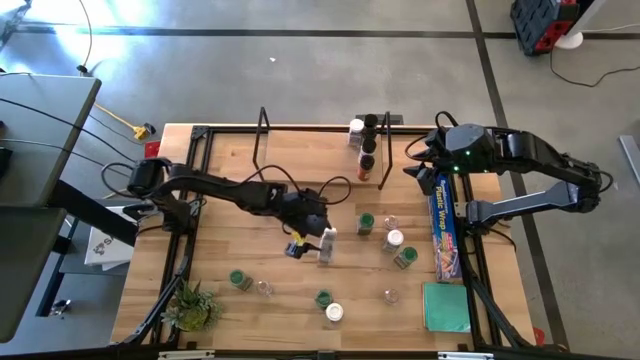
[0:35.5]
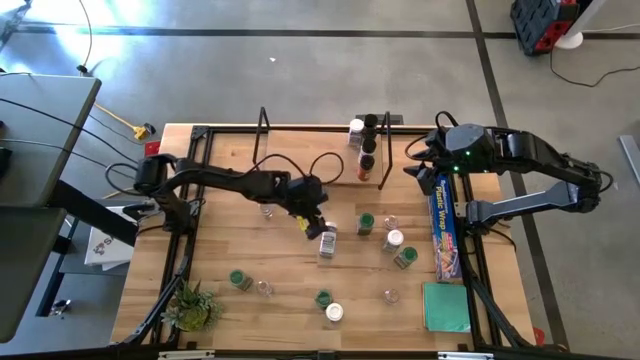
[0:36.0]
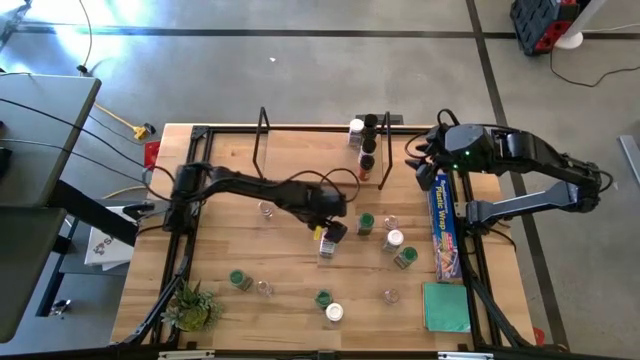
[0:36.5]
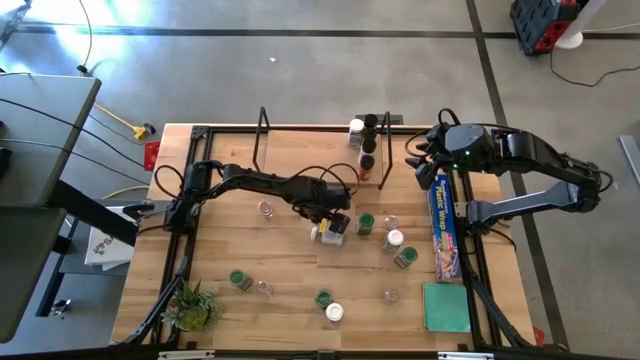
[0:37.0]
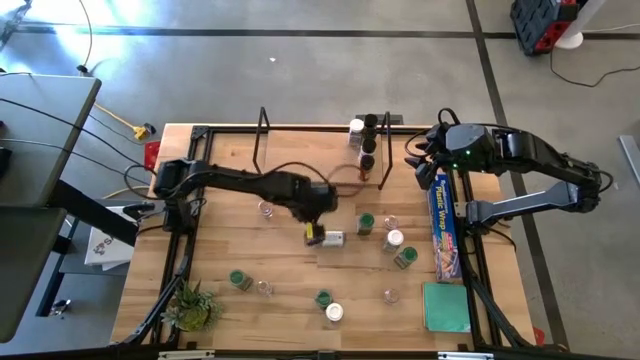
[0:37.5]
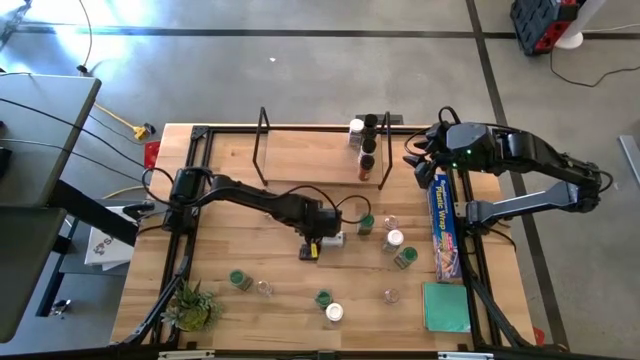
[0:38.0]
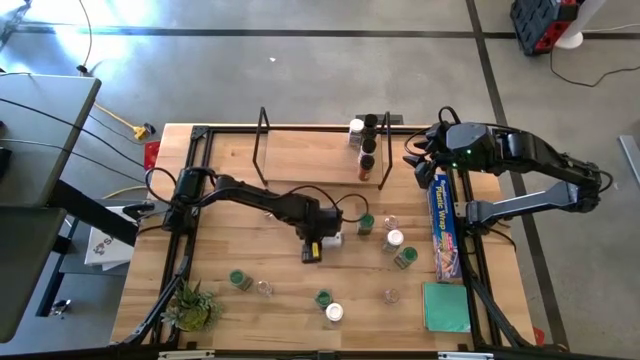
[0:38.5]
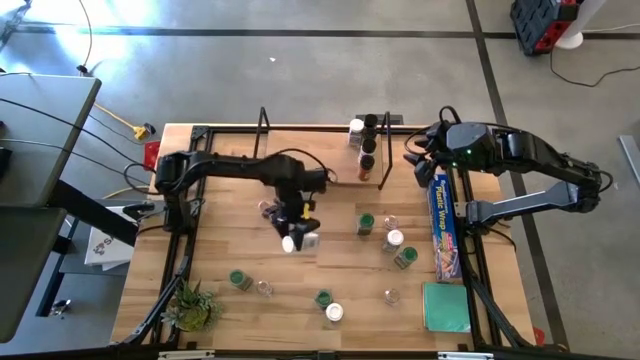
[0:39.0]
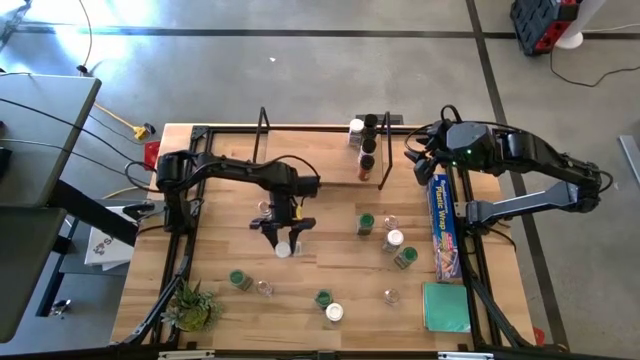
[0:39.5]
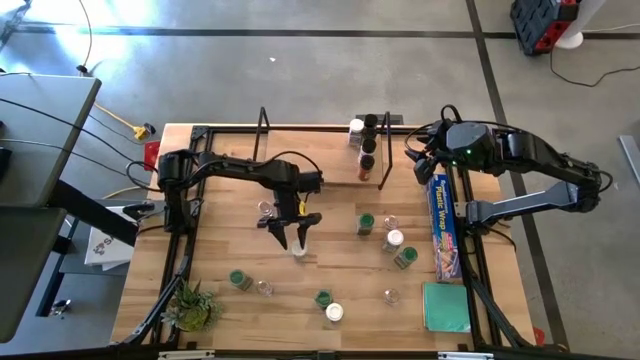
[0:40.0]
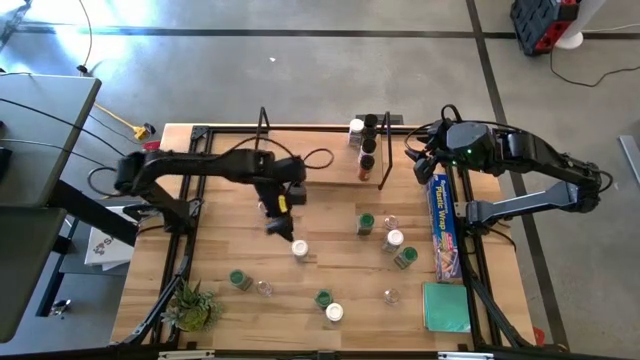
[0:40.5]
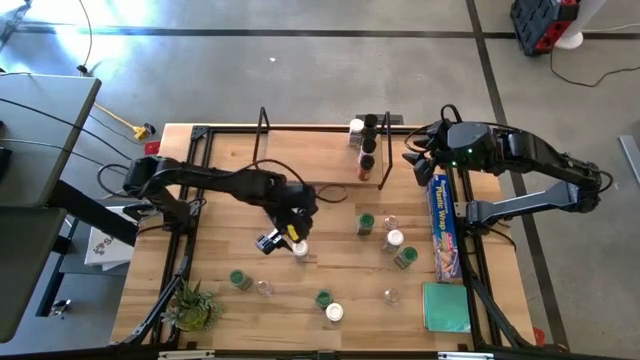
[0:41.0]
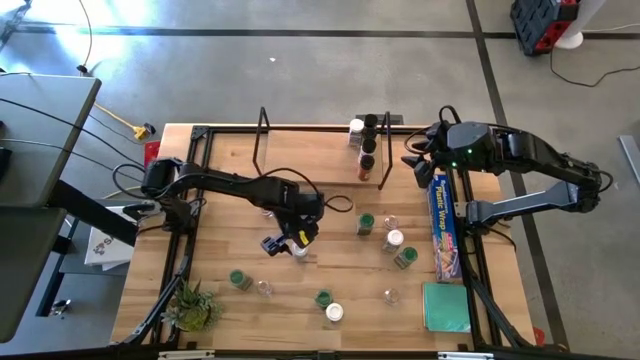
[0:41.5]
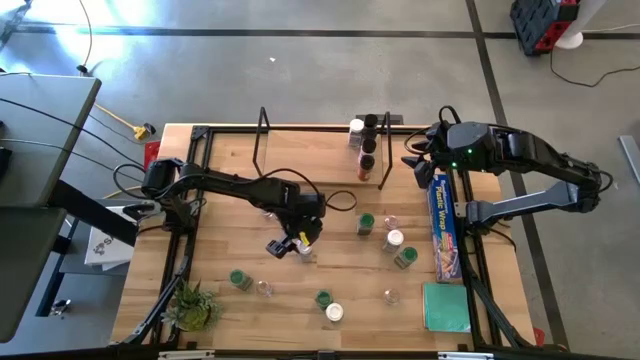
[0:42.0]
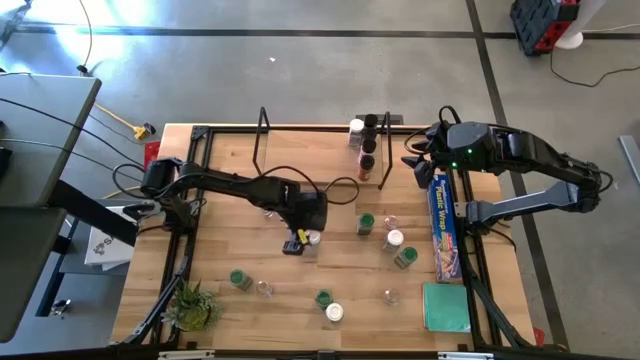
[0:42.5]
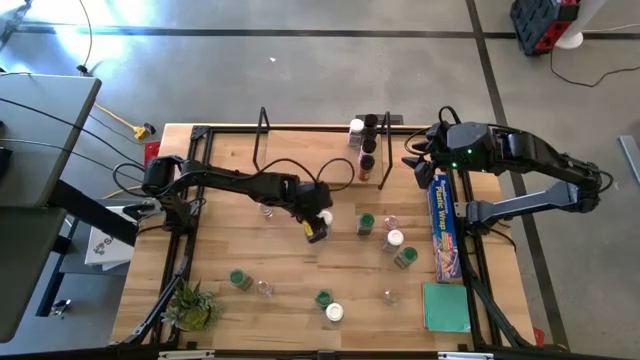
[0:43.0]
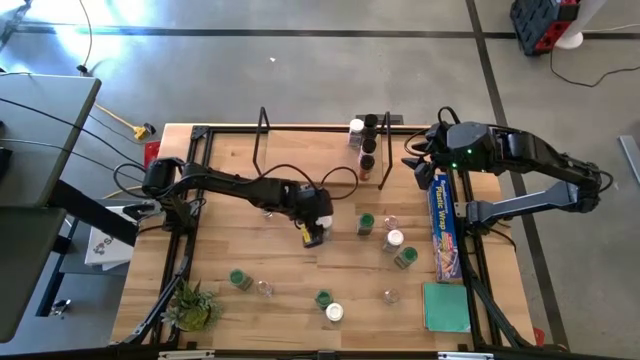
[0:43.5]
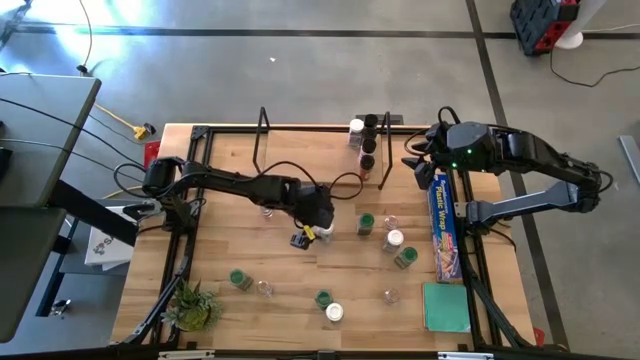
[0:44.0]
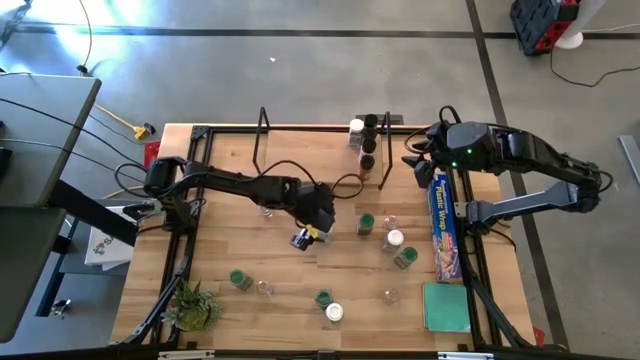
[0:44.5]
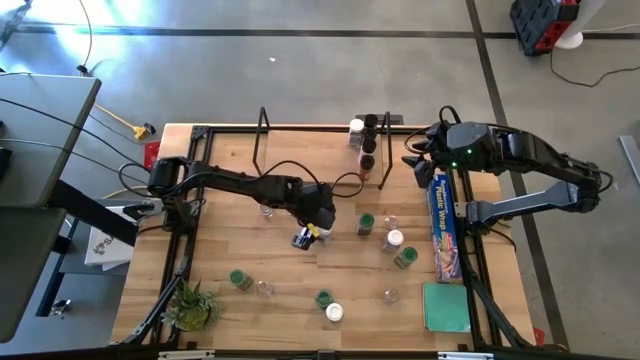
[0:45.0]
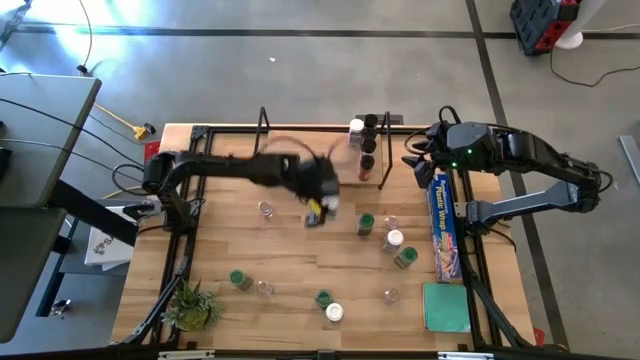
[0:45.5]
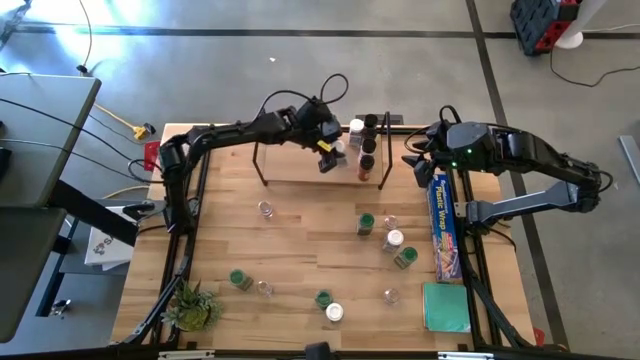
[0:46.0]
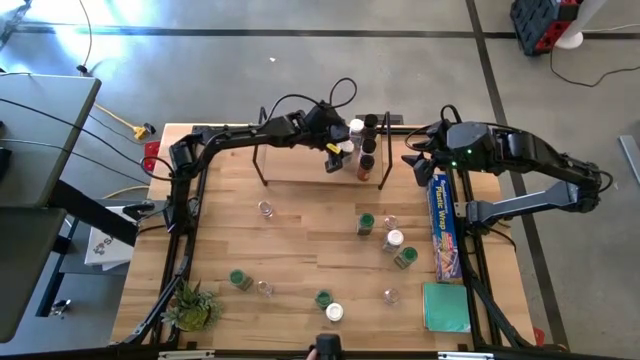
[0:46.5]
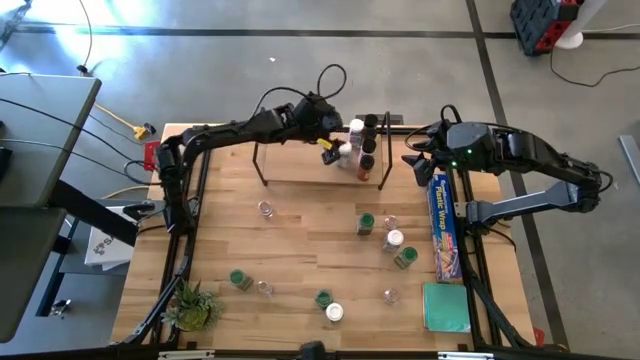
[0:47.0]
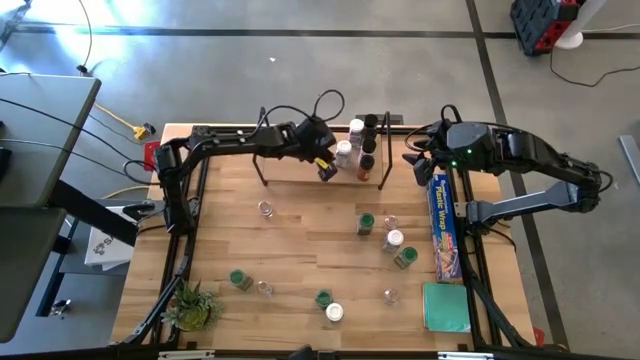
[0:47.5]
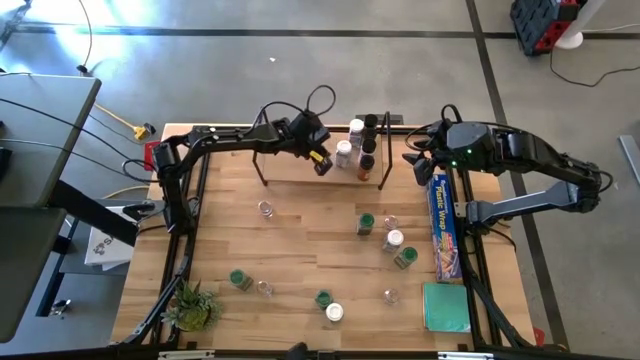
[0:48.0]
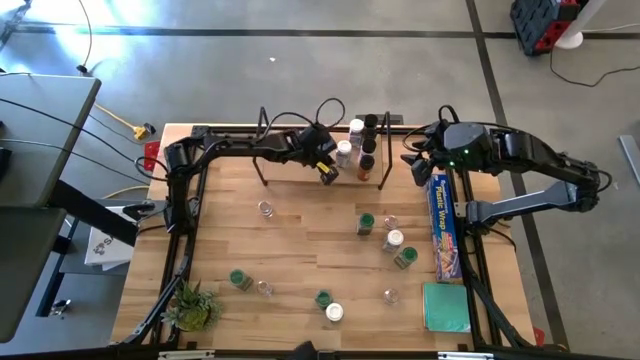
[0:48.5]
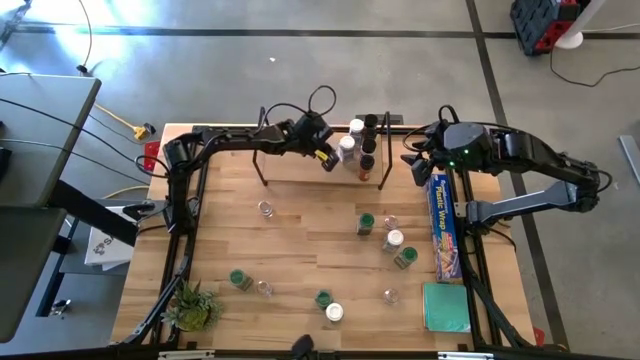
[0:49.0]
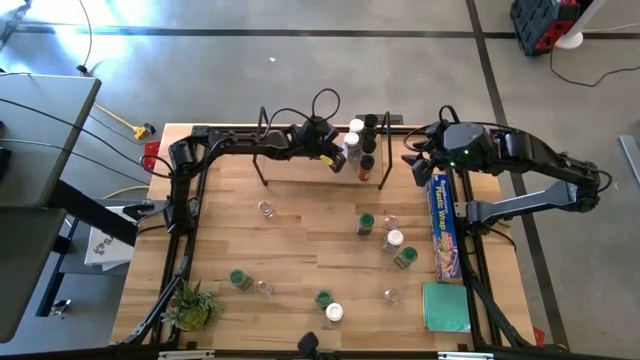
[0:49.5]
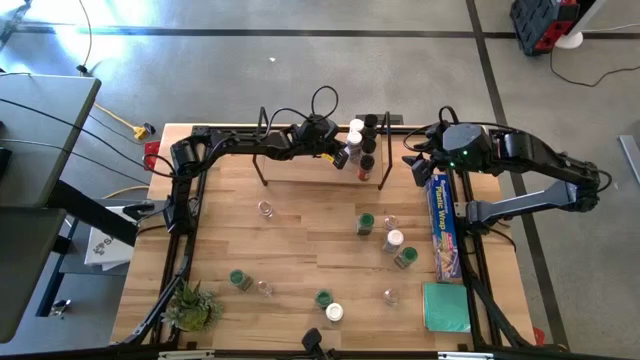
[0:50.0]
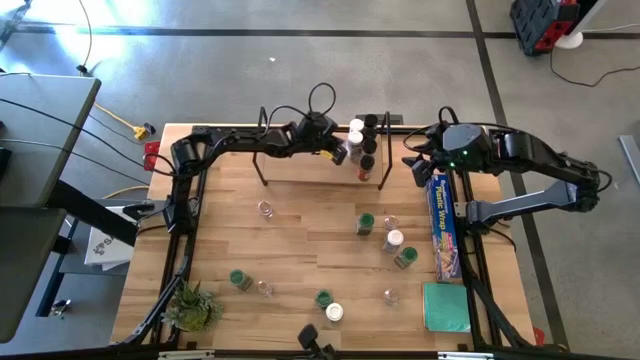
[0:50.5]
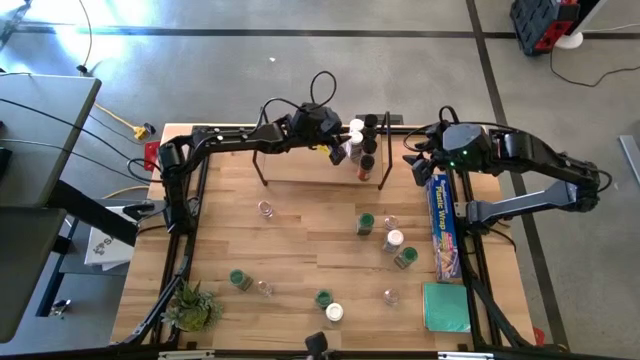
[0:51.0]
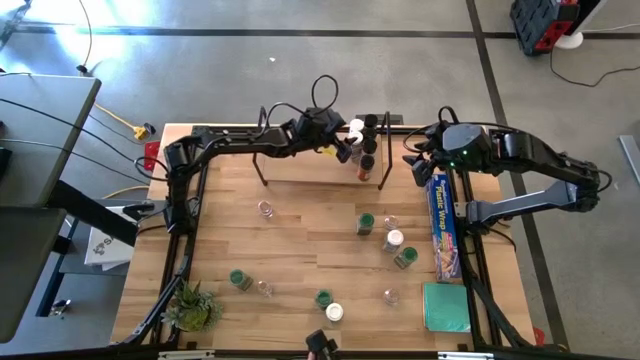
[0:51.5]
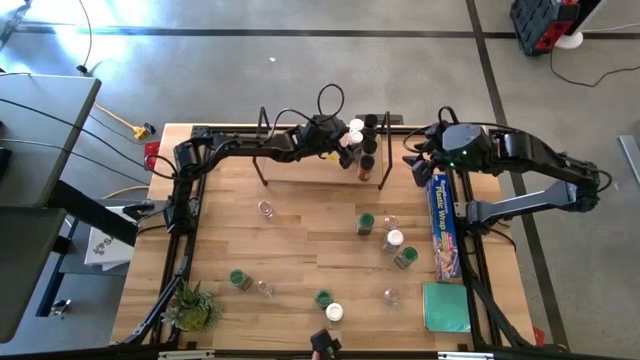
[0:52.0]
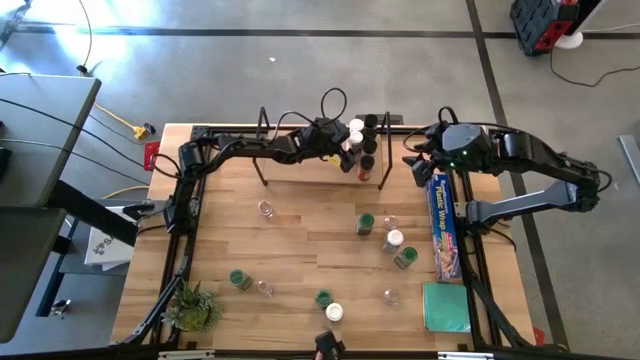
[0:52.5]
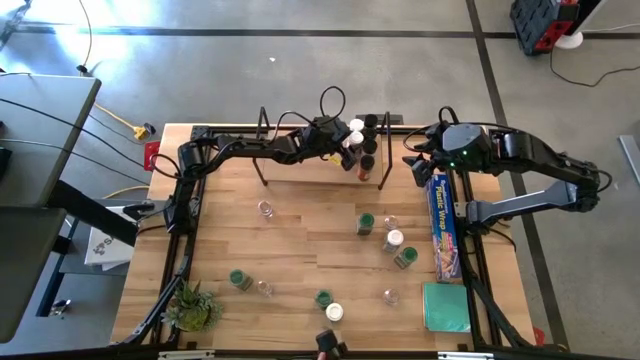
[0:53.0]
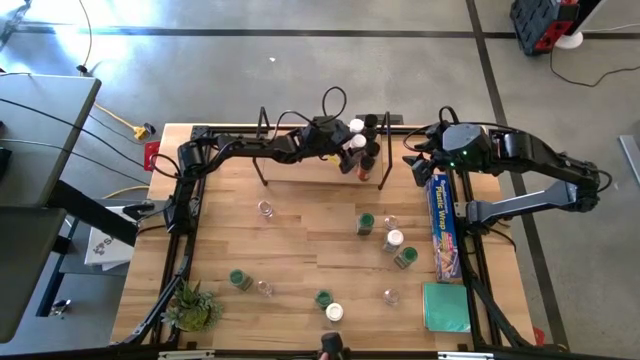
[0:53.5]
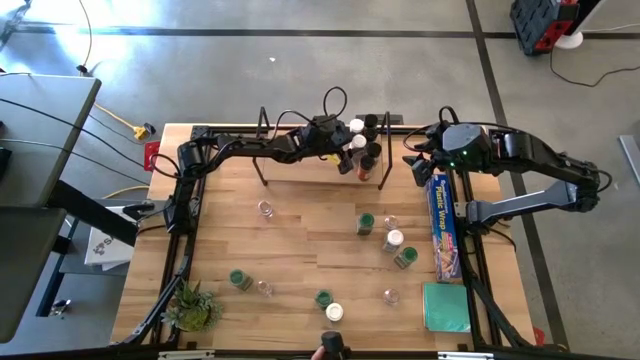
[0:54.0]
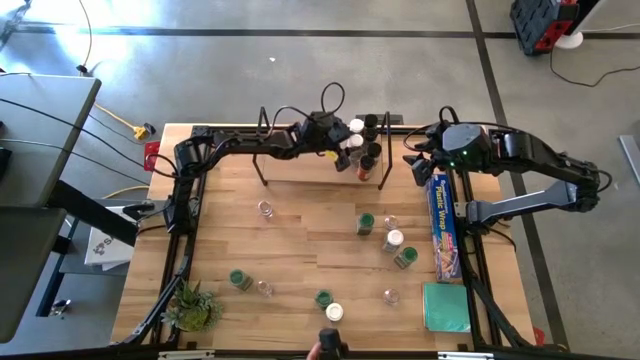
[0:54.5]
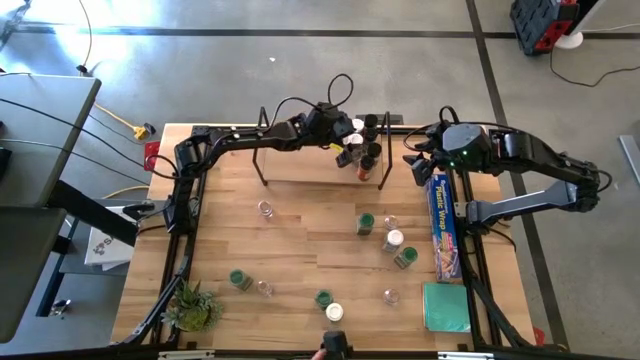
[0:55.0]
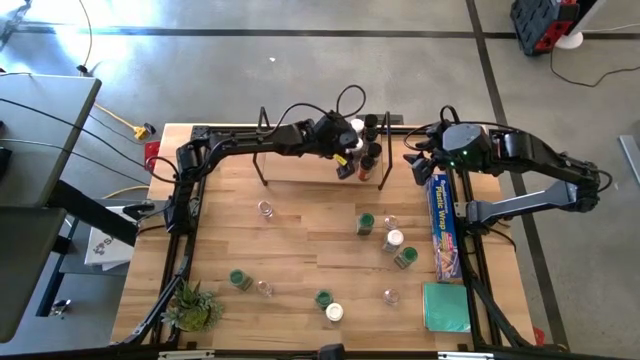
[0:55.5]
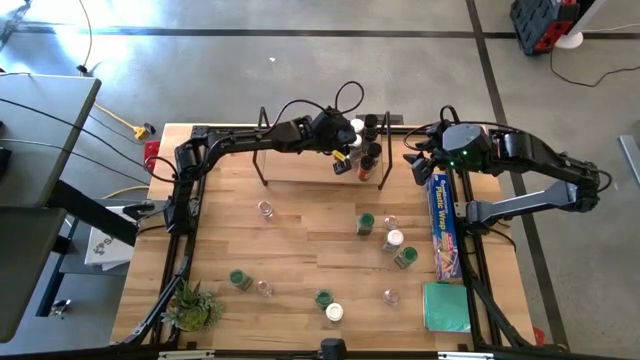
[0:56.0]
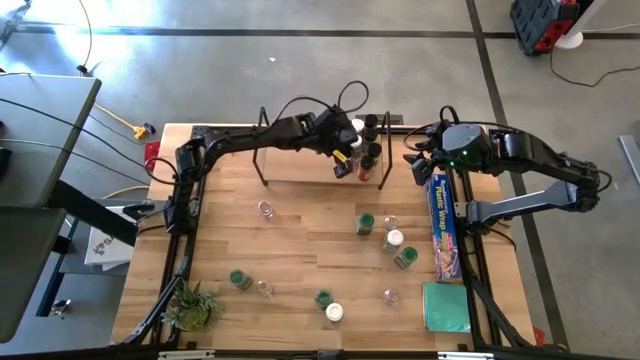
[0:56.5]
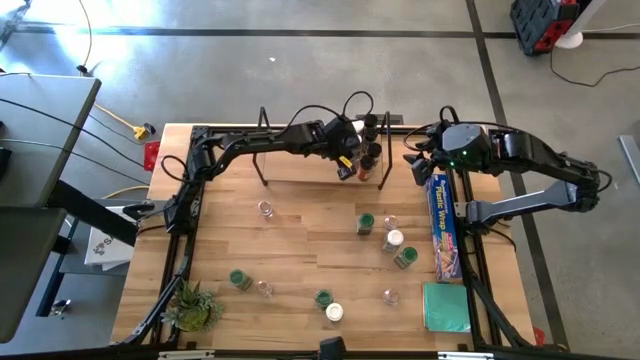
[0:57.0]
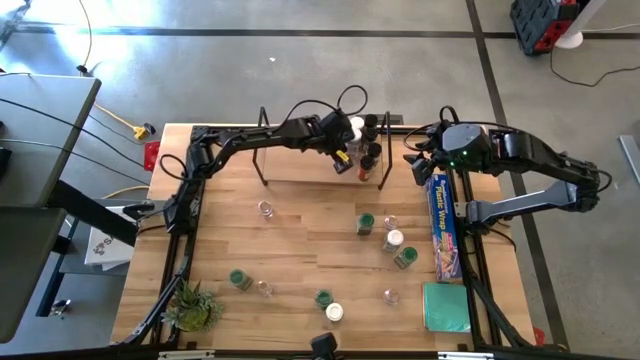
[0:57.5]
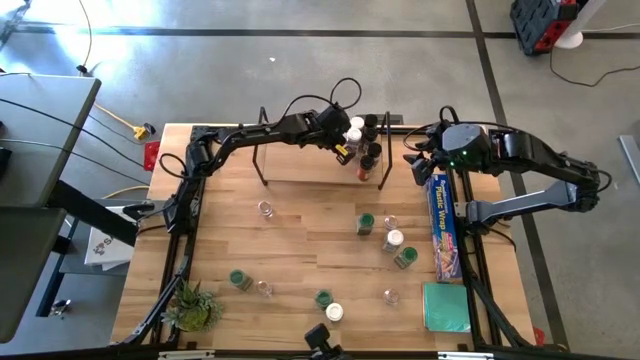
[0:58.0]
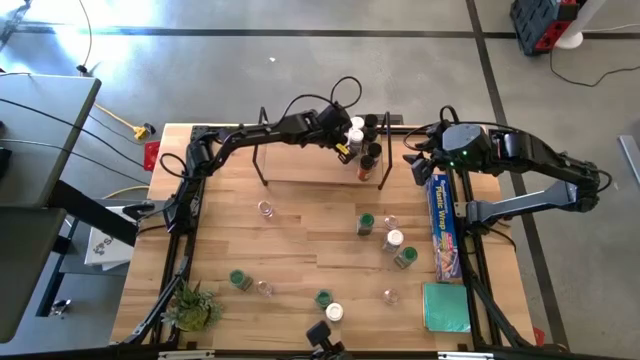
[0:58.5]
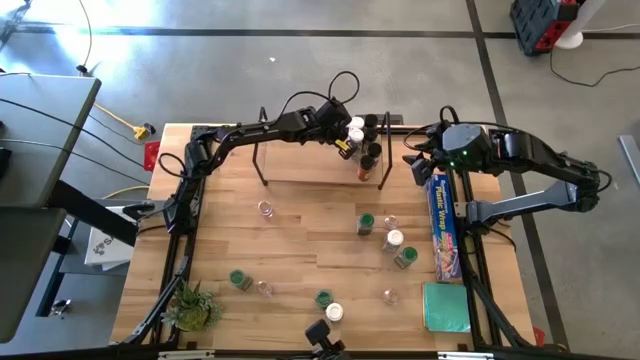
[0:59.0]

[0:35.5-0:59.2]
Task: Shelf spices
Put the white seasoning bottle on the shelf aligned with the other white seasoning bottles
